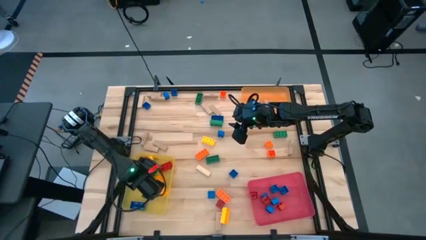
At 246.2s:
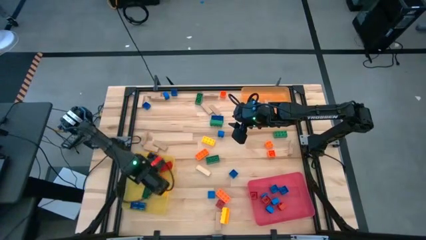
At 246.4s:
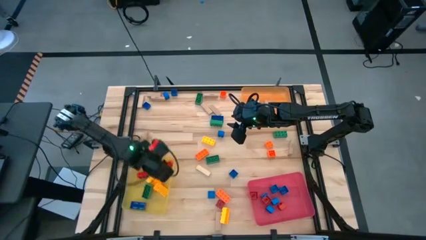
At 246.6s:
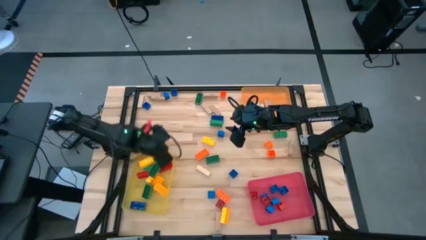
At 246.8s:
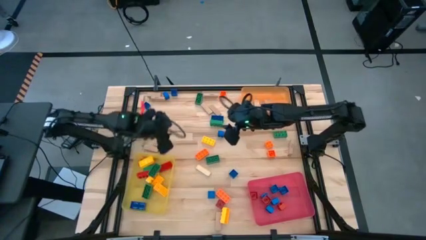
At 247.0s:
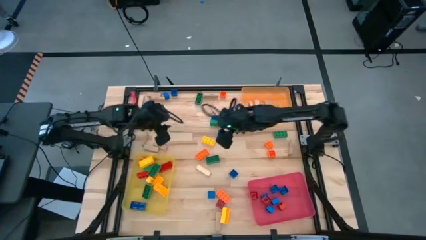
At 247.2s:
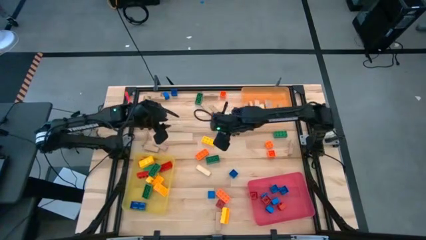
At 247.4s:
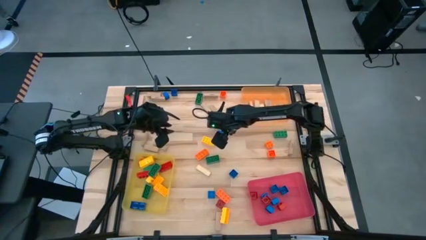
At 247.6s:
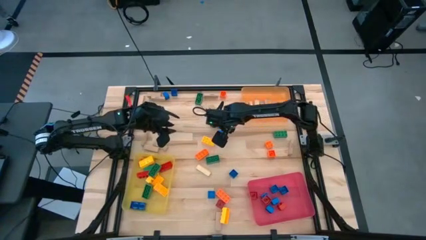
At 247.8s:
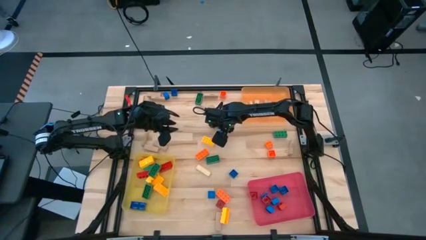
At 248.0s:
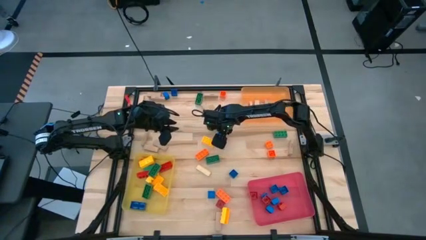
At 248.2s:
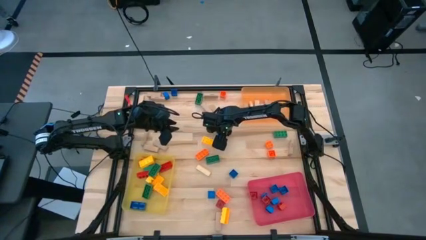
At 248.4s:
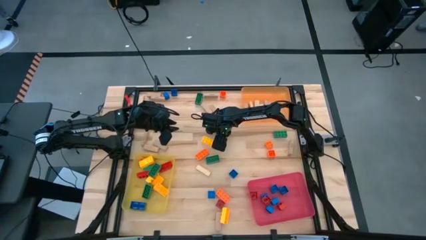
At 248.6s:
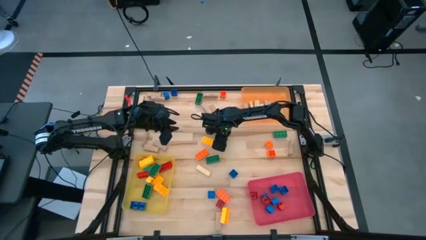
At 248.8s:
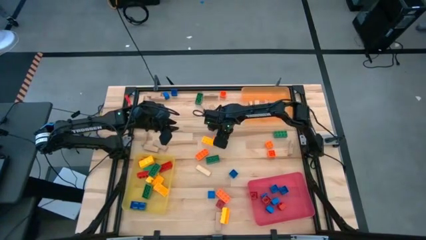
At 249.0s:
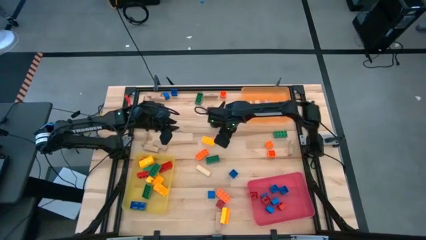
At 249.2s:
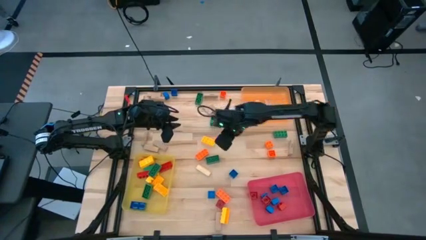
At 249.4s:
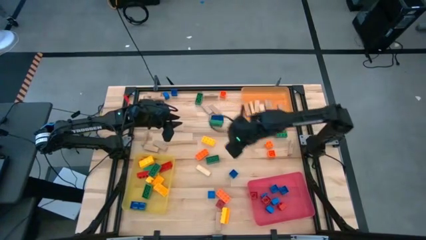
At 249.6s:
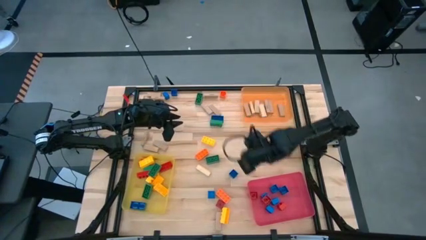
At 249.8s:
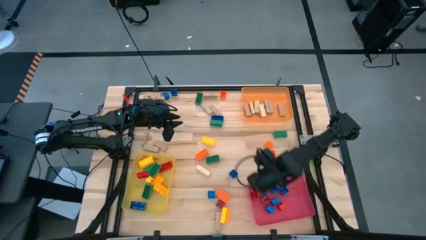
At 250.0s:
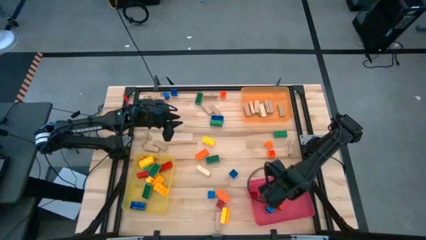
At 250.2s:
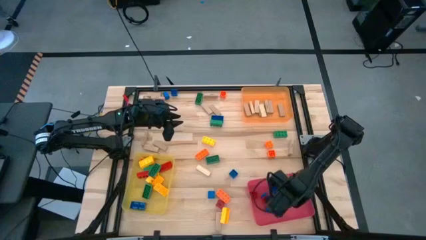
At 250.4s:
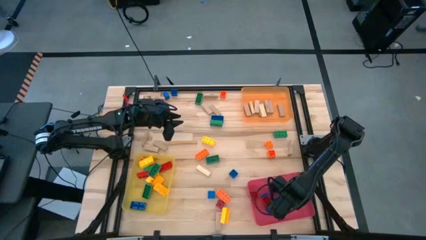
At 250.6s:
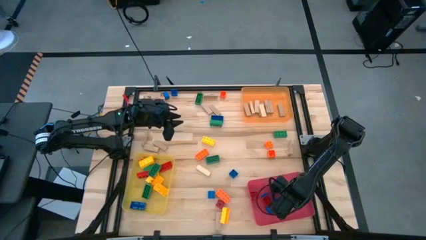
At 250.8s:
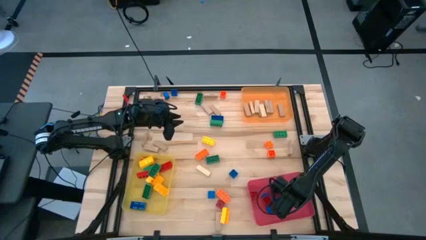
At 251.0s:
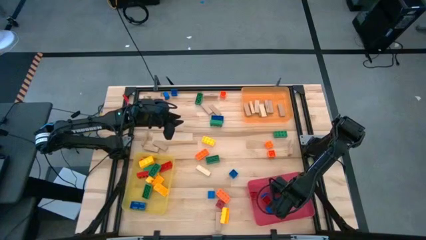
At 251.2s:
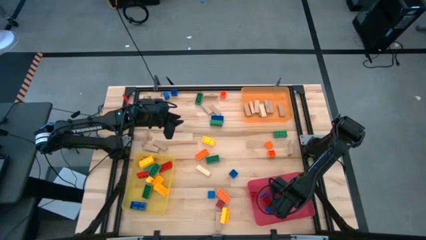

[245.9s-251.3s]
Task: Sort blocks by size
Put the small blue game piece into the red bin

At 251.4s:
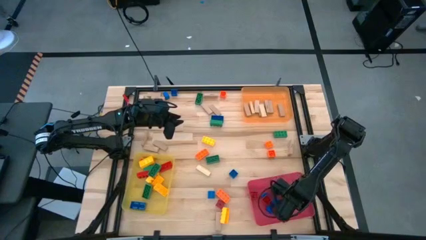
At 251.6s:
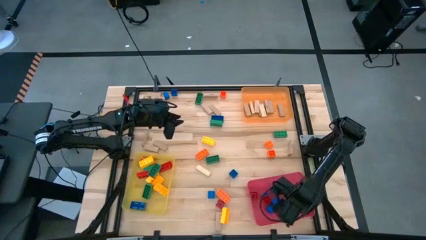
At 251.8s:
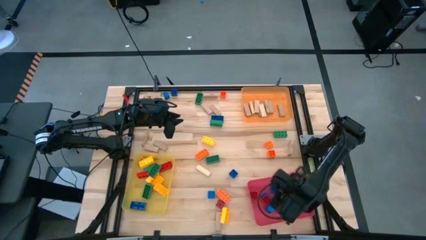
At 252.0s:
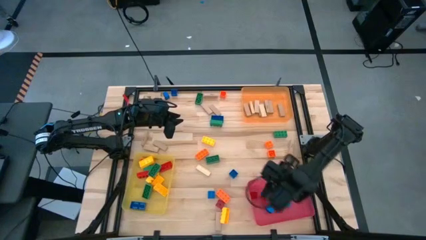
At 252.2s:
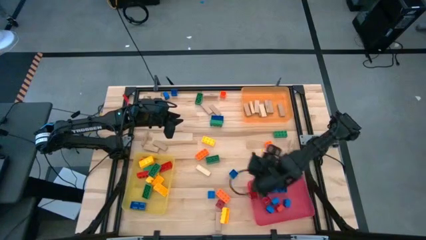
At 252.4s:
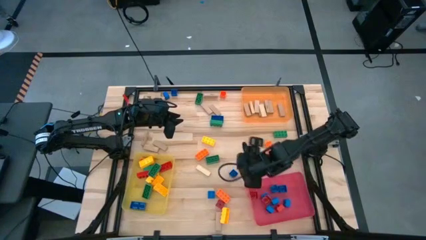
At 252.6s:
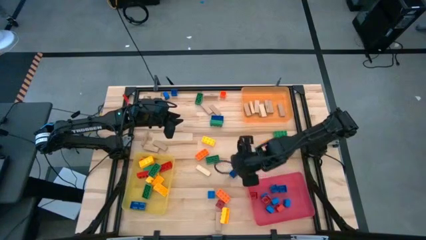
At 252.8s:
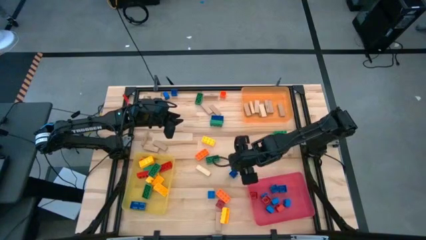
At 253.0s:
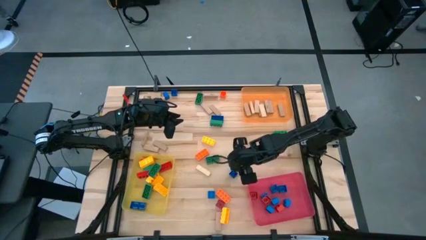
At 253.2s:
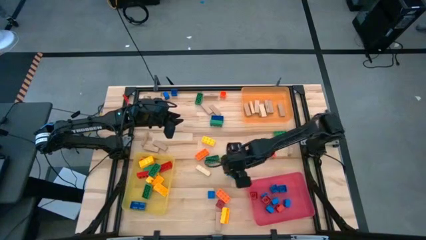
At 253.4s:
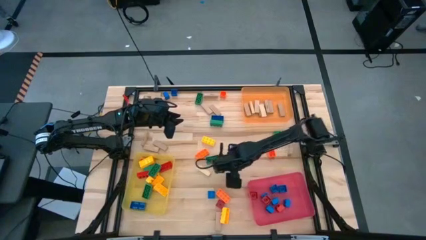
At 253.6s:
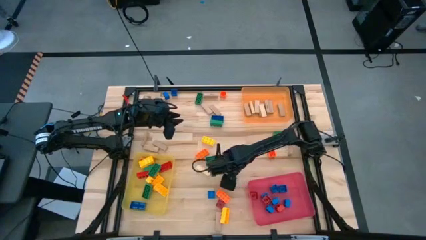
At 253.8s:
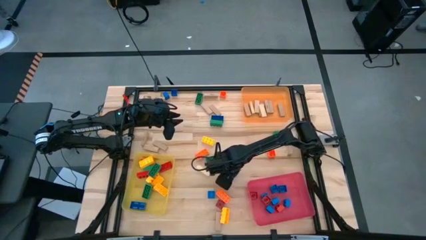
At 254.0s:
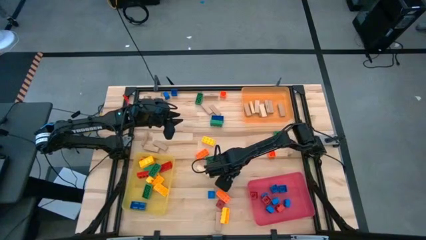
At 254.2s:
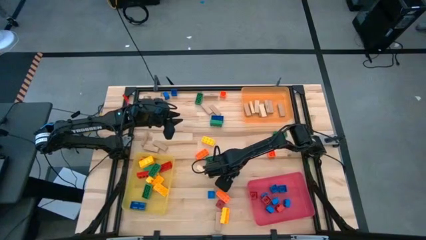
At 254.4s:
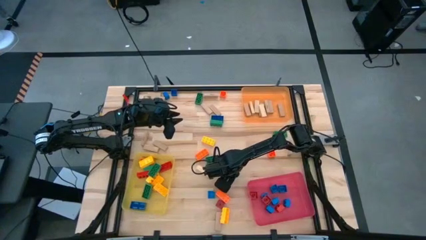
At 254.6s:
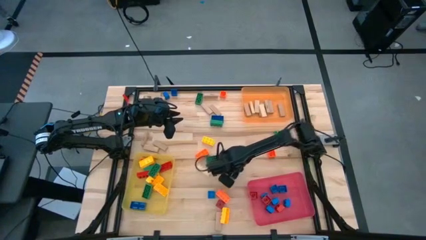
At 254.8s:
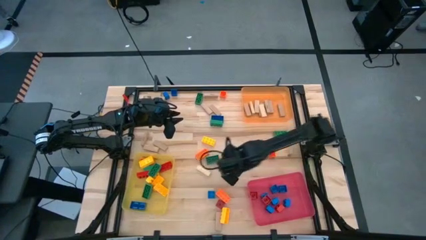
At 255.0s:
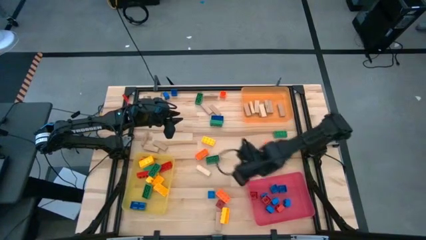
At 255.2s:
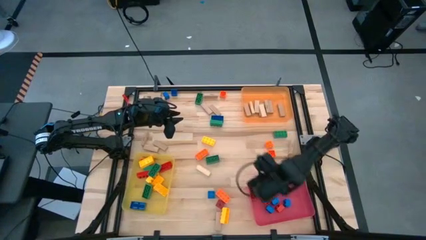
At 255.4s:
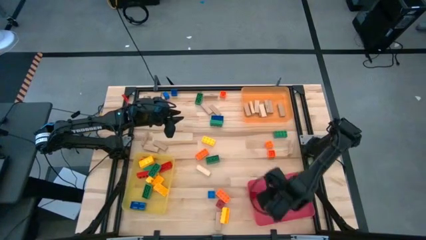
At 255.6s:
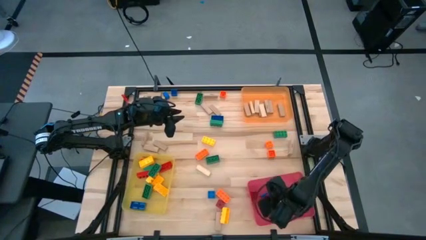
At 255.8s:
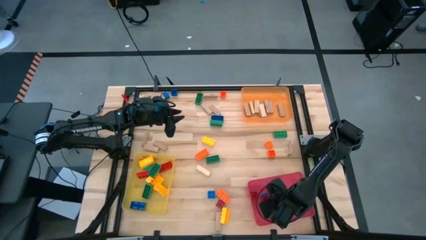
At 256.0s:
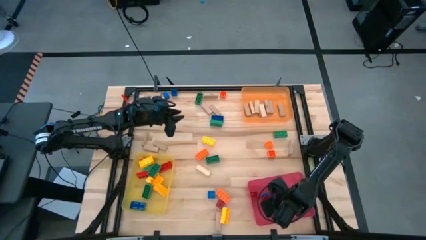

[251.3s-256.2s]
Put the small blue game piece into the red bin

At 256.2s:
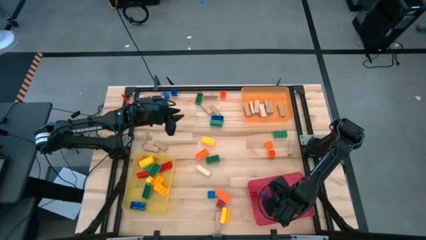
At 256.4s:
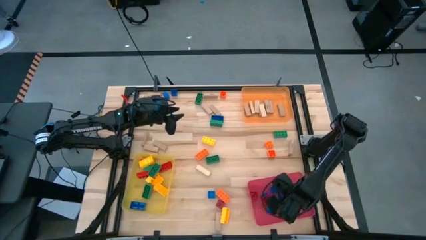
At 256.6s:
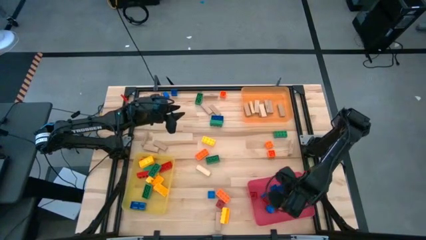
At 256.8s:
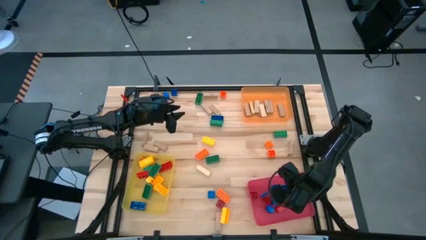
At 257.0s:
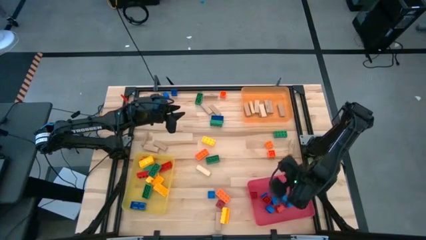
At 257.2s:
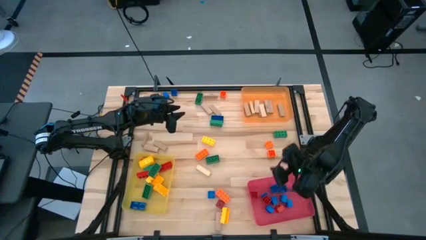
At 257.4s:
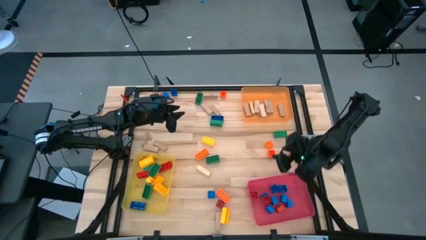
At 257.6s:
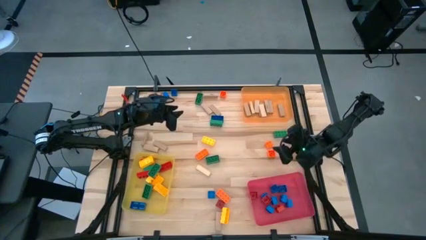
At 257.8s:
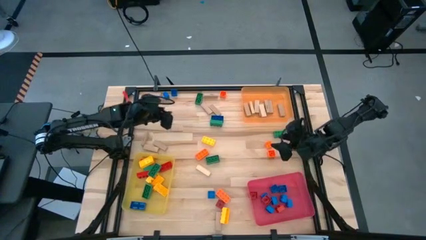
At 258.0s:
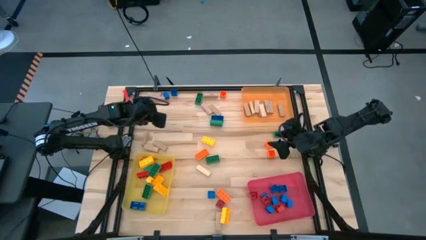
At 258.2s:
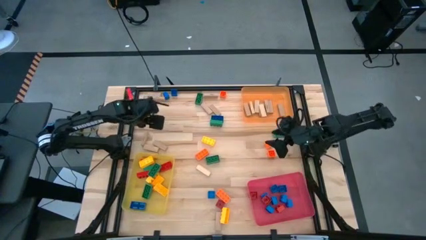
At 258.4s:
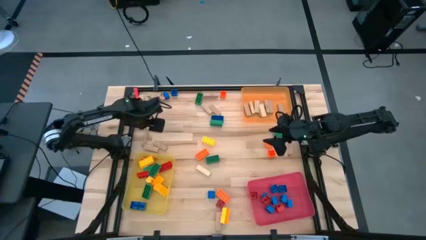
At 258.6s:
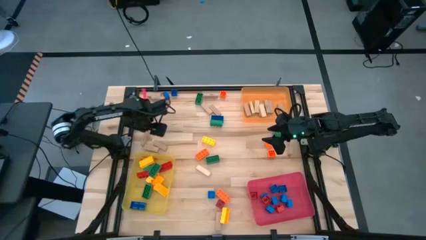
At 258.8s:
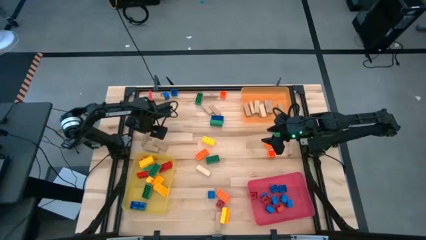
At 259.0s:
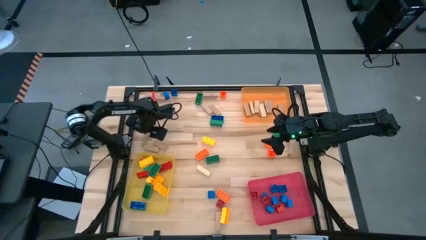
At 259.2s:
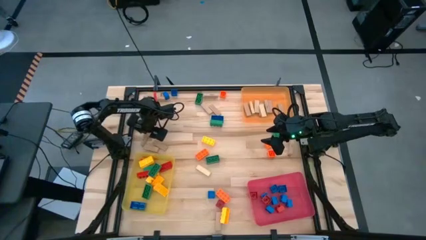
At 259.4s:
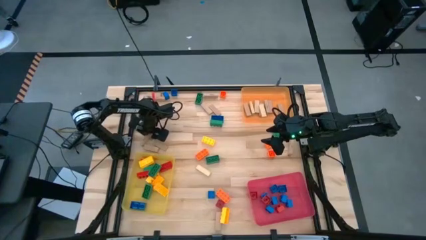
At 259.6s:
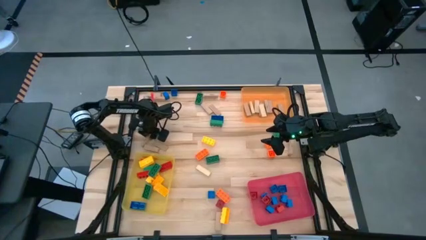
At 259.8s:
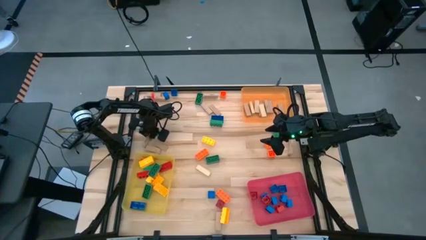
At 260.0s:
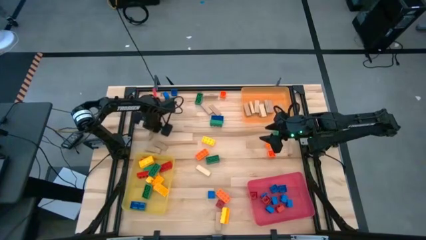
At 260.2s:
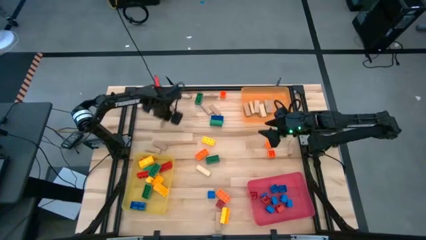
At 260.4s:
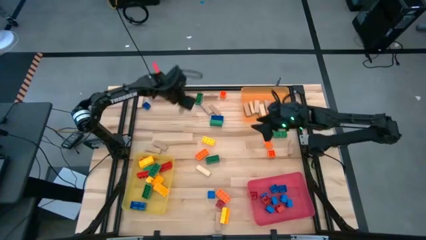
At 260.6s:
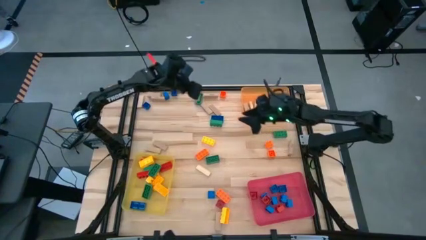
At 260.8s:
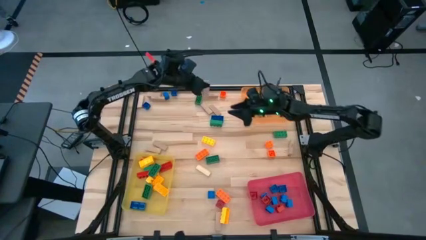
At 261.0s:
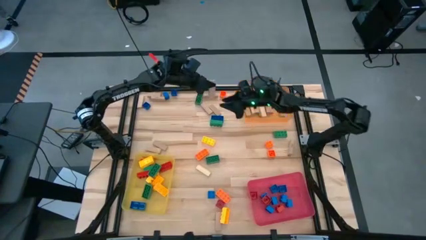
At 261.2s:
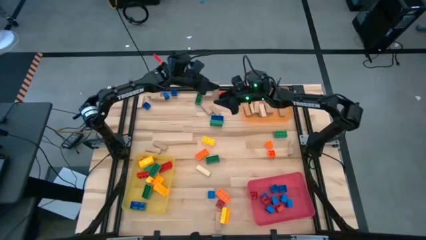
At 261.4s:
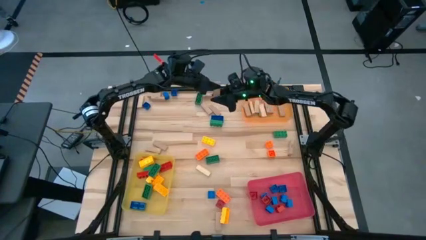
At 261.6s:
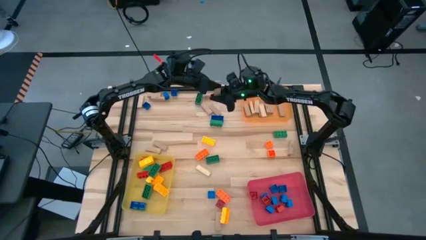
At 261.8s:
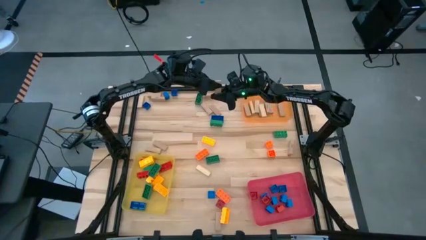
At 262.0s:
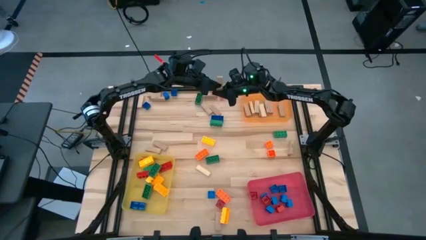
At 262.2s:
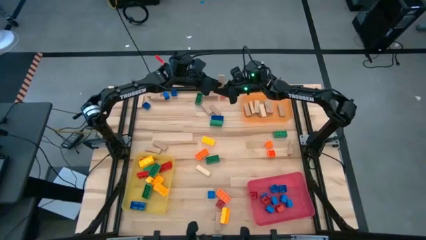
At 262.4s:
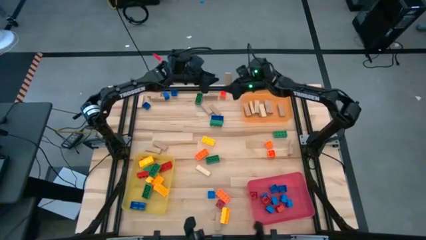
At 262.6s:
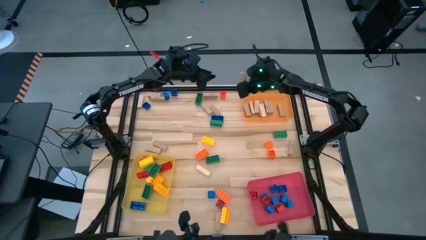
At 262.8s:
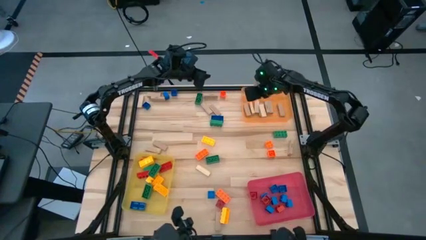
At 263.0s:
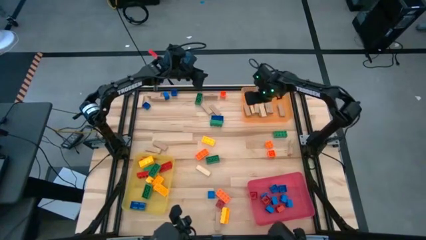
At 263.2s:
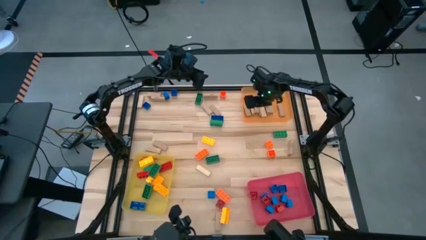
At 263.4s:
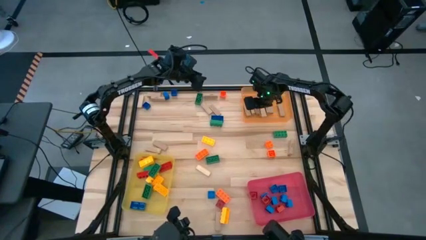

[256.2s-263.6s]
Put the brown block into the orange bin
